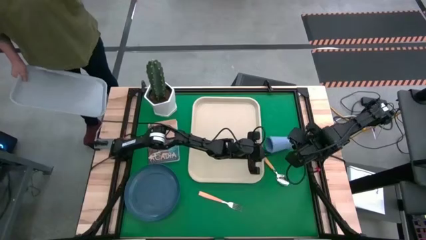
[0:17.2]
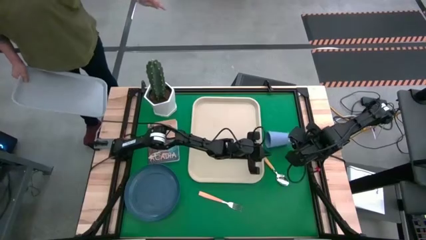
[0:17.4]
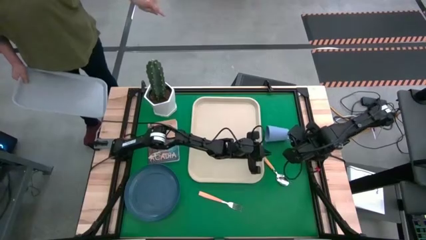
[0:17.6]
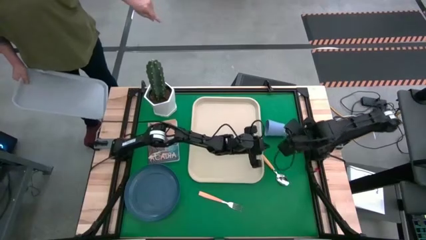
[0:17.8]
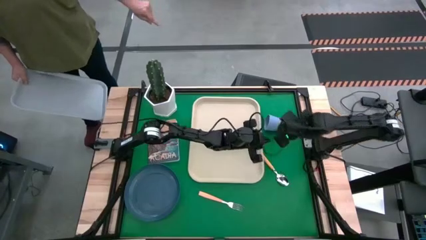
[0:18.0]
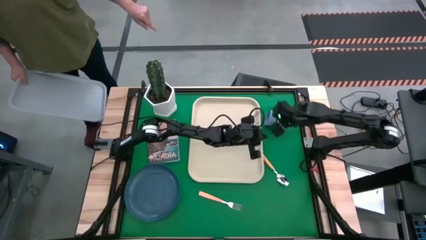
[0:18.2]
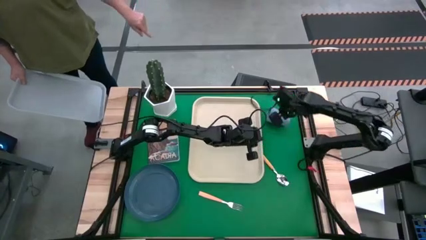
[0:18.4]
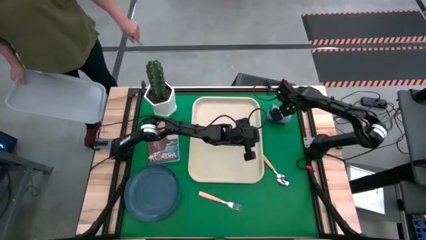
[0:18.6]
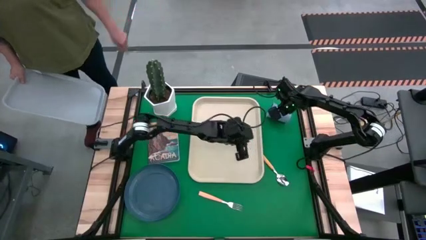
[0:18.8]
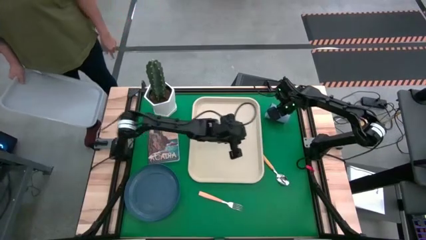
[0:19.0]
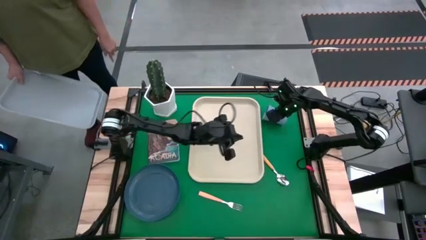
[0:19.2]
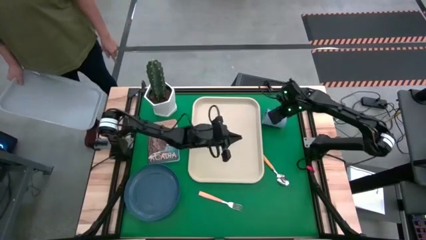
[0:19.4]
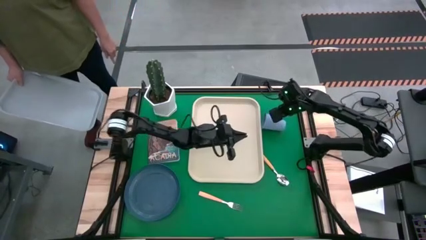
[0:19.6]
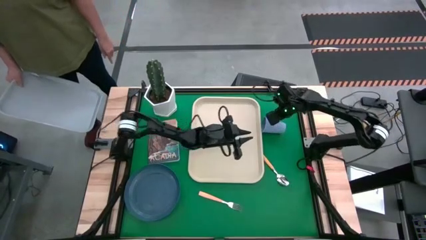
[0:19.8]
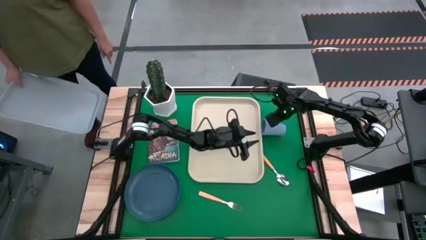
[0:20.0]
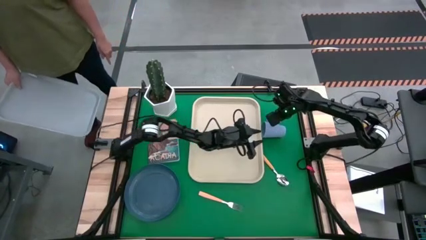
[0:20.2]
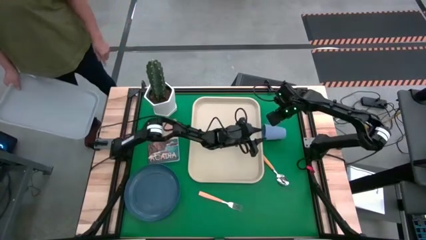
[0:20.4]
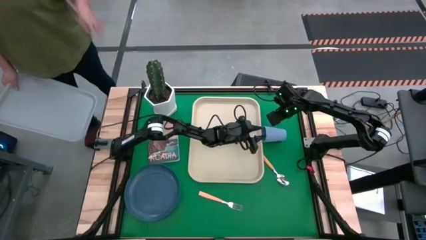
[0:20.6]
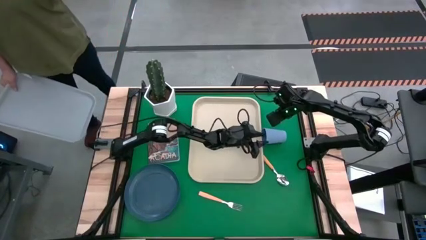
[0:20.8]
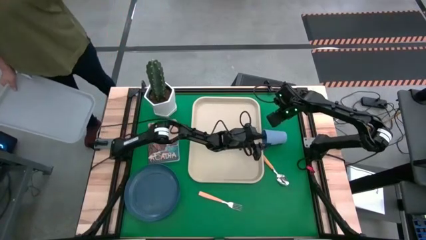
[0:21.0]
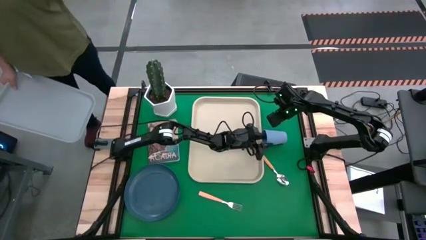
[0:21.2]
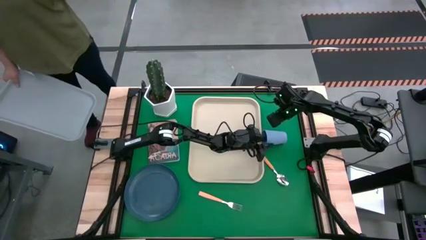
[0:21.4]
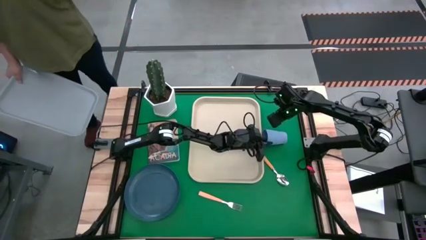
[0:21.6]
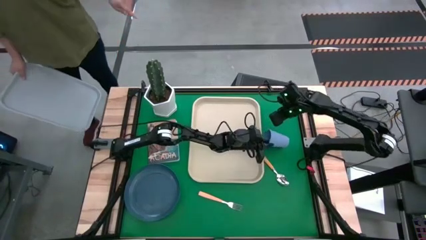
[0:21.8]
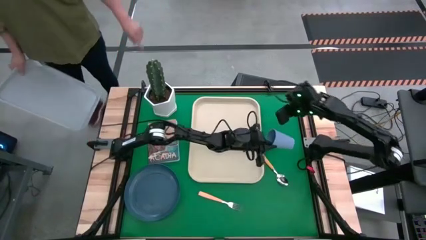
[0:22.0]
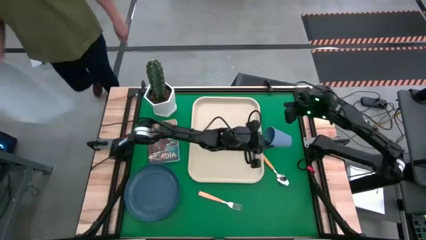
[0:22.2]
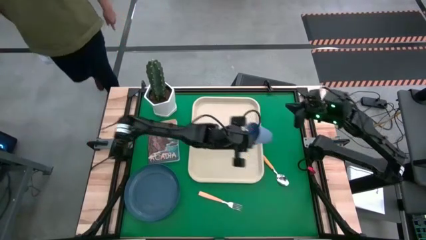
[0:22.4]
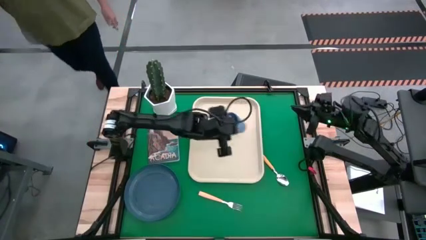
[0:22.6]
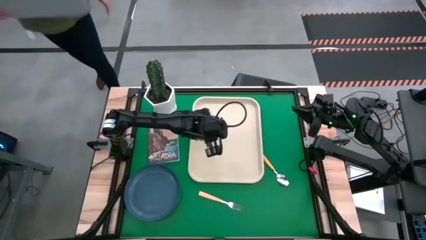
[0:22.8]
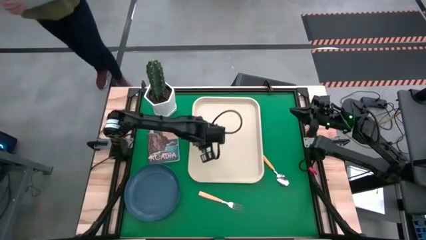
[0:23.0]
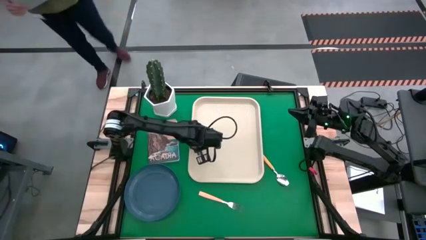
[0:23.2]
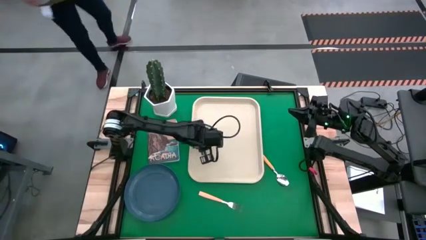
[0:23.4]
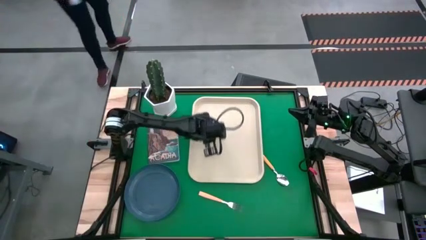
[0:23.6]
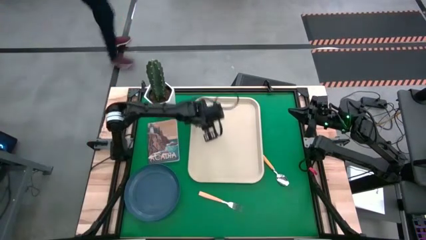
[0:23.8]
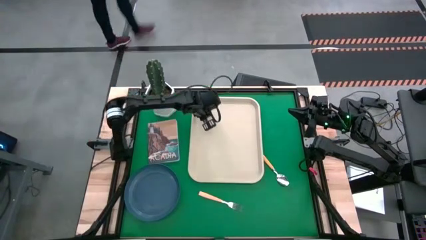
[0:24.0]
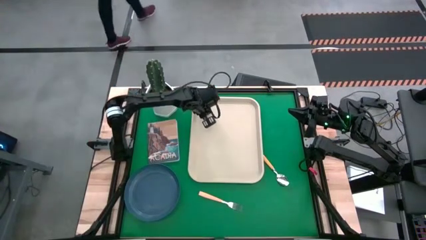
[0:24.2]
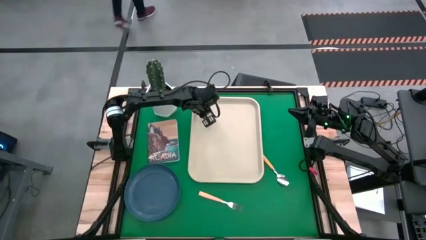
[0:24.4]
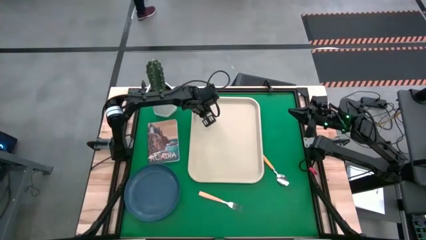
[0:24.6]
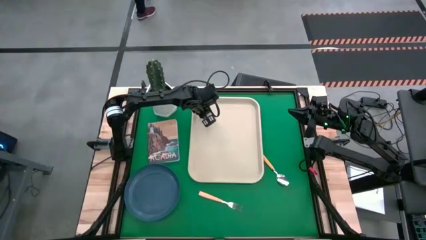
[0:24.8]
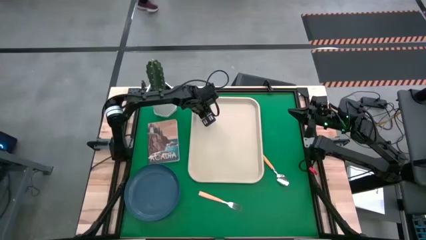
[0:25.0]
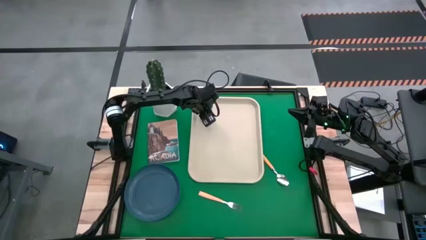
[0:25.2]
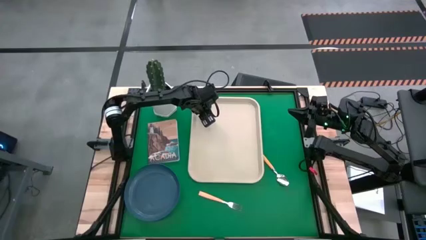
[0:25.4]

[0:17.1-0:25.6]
Task: Pick and place plate/cup/fork/spoon on tray
Put the blue cup on the white tray
